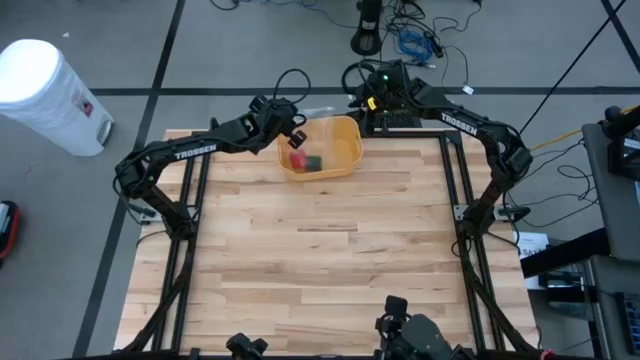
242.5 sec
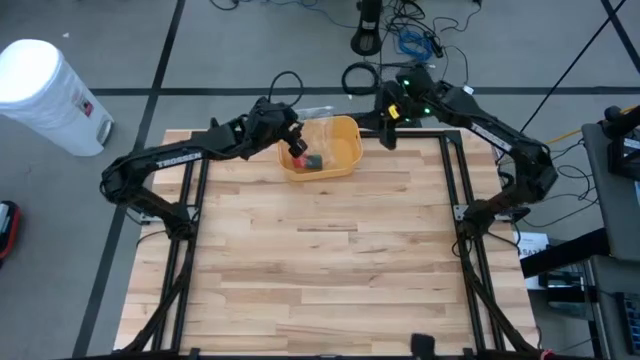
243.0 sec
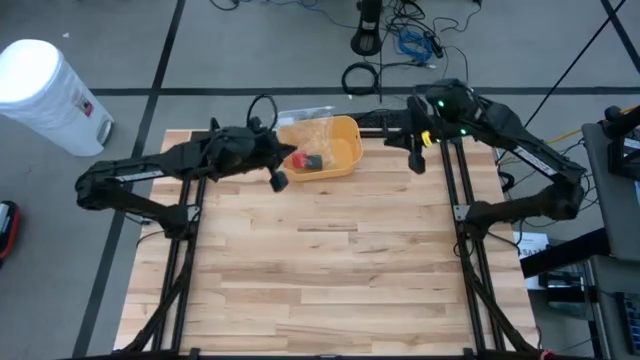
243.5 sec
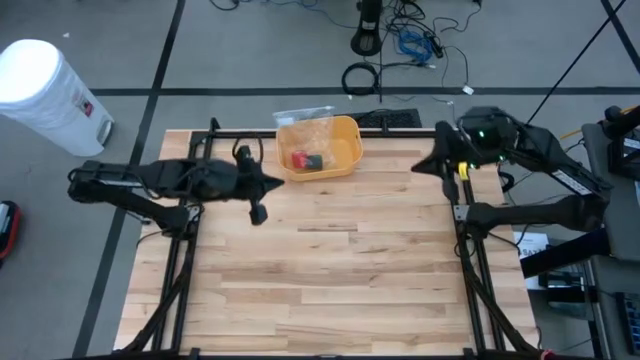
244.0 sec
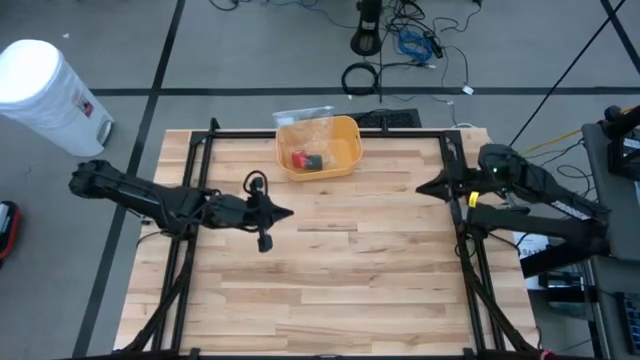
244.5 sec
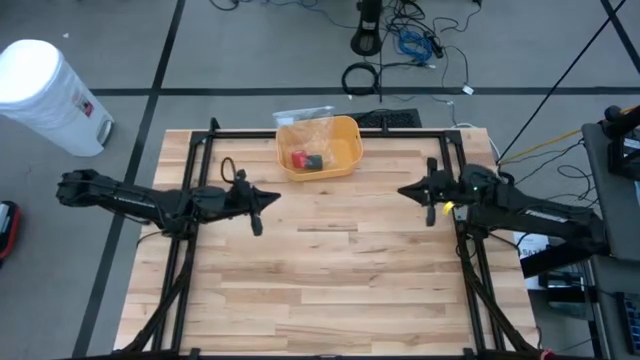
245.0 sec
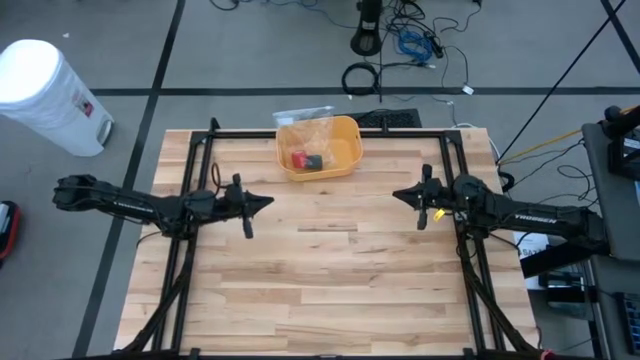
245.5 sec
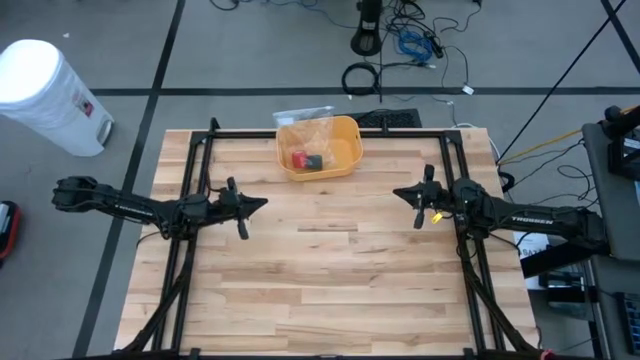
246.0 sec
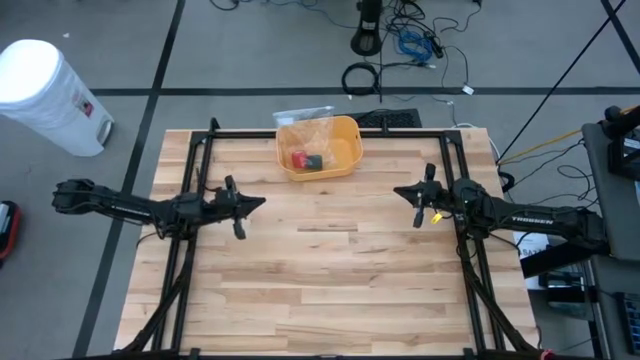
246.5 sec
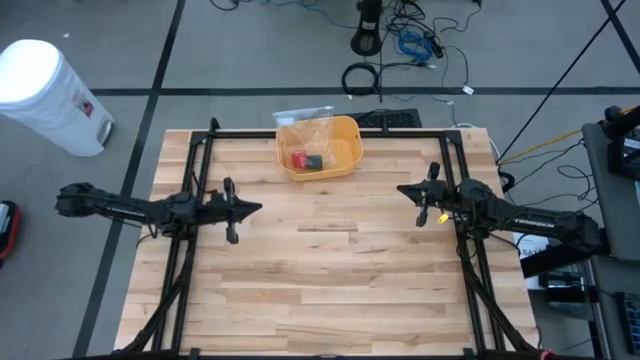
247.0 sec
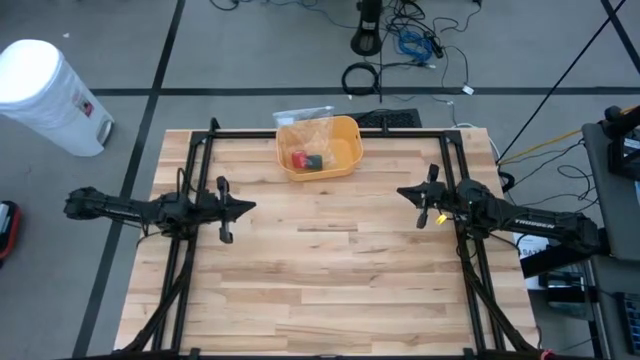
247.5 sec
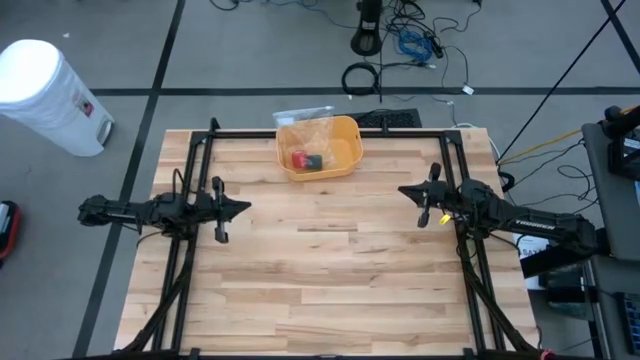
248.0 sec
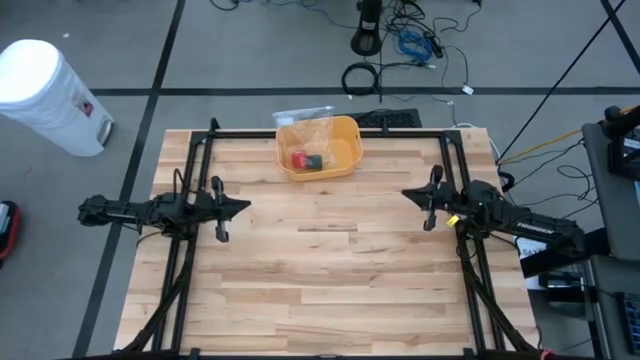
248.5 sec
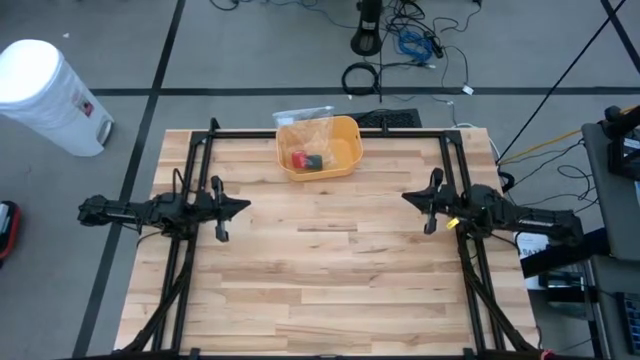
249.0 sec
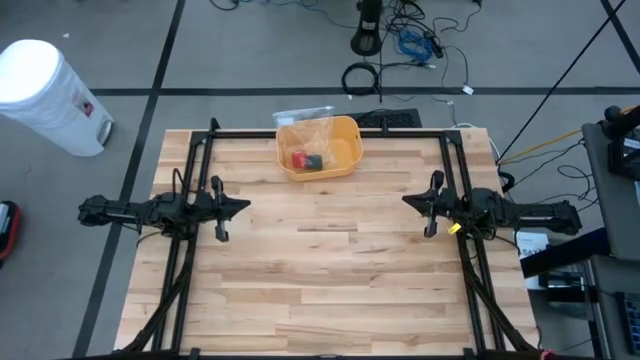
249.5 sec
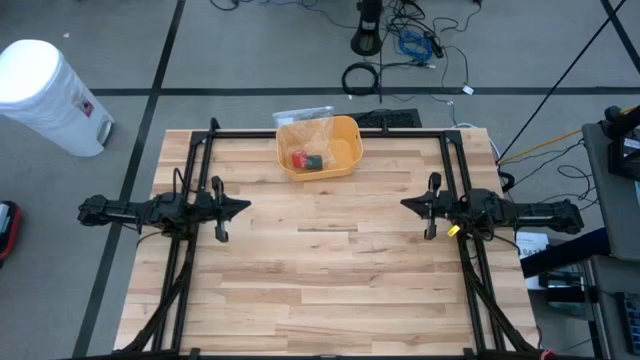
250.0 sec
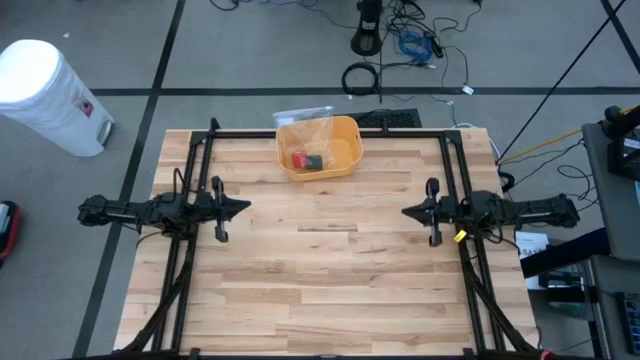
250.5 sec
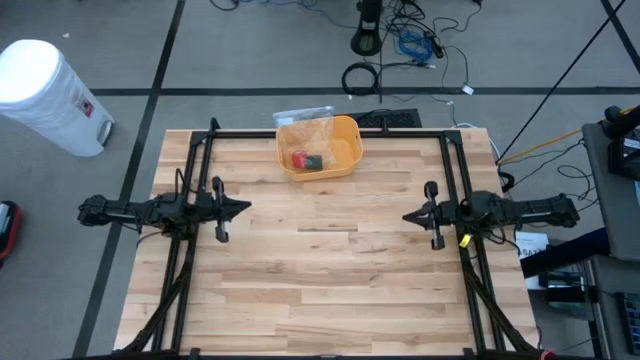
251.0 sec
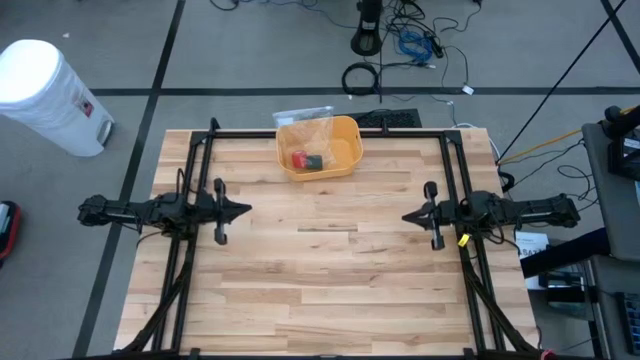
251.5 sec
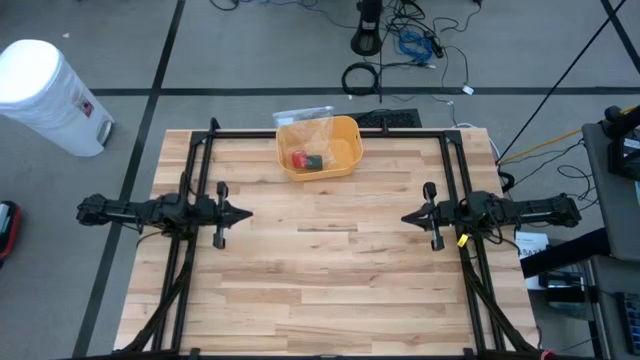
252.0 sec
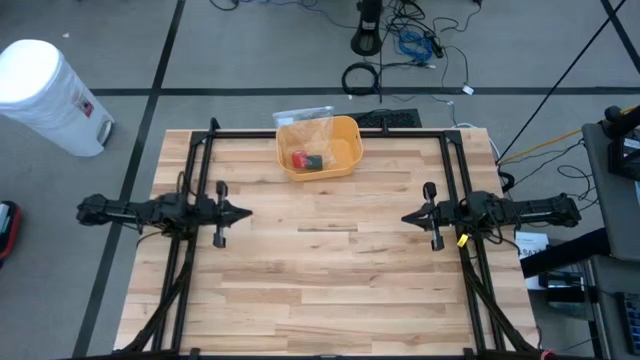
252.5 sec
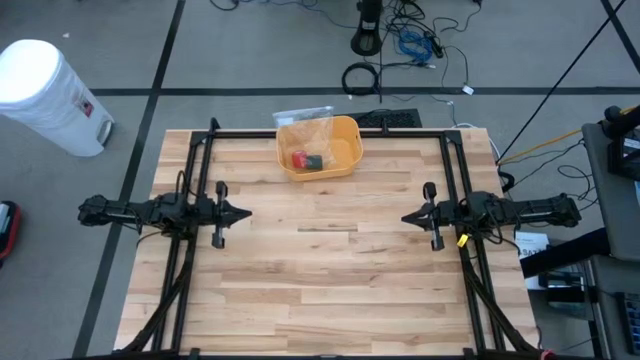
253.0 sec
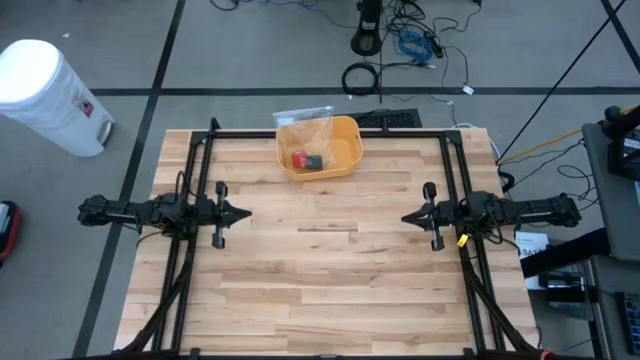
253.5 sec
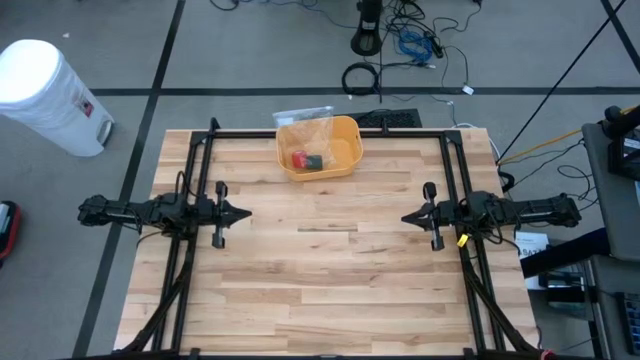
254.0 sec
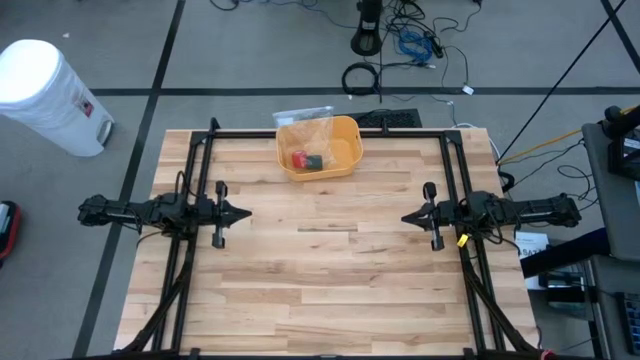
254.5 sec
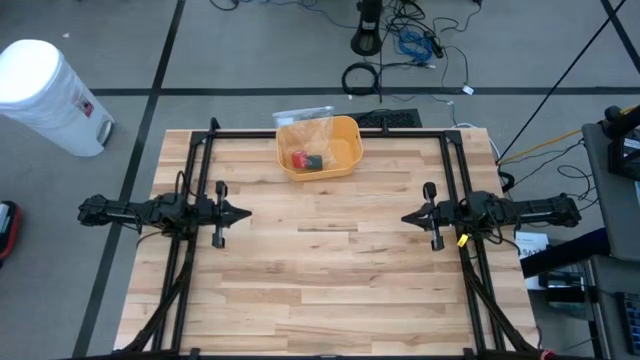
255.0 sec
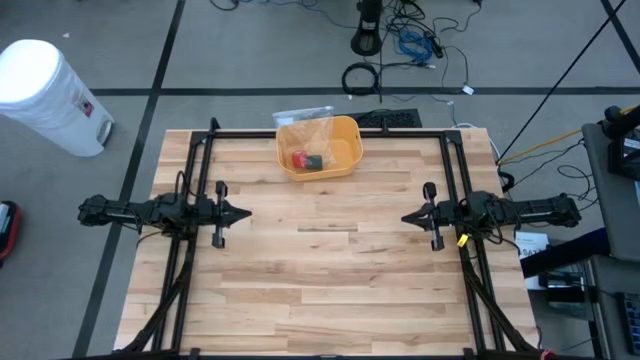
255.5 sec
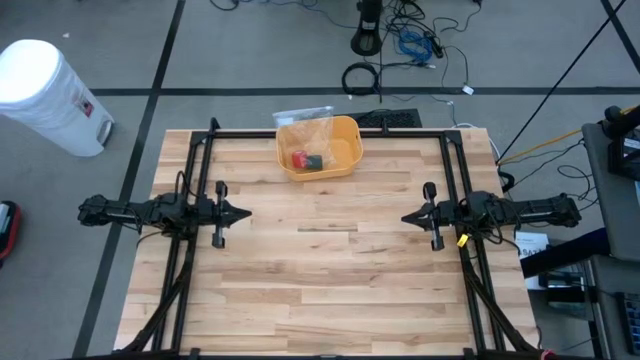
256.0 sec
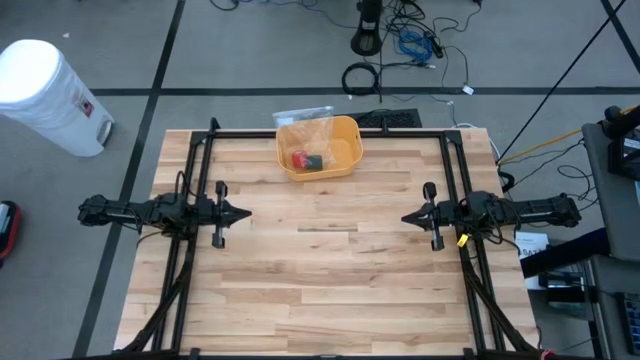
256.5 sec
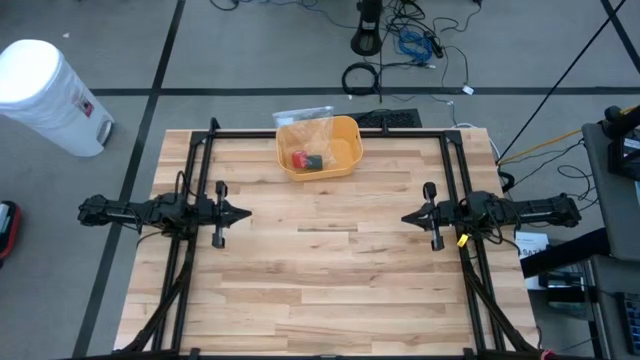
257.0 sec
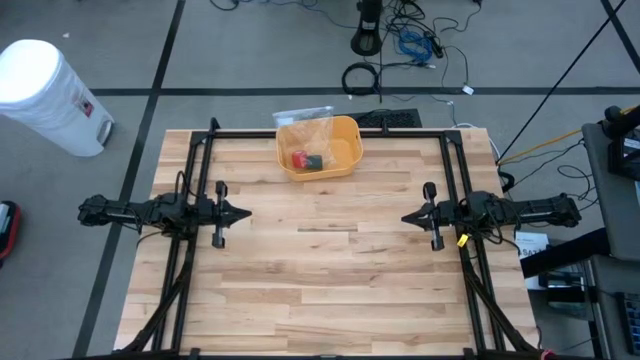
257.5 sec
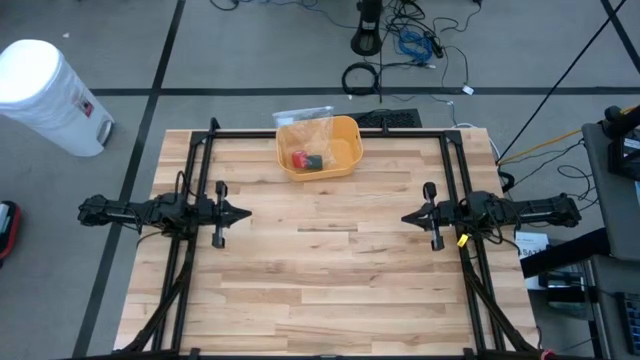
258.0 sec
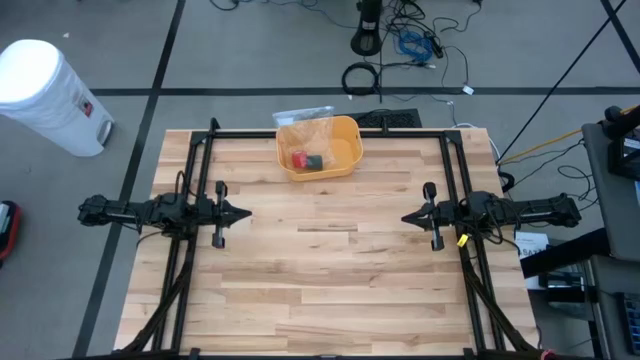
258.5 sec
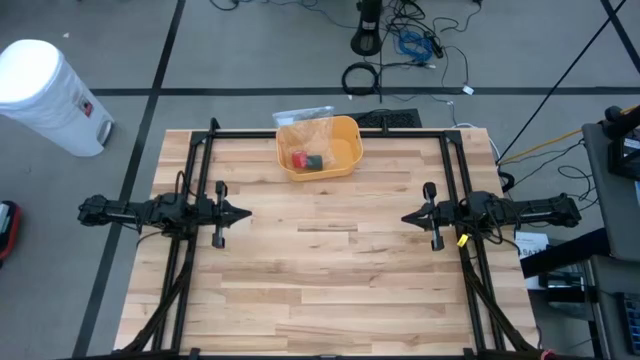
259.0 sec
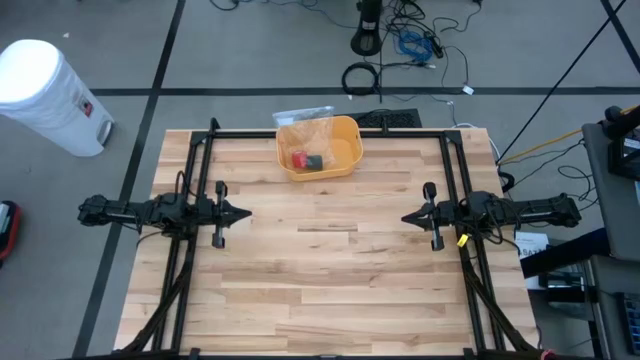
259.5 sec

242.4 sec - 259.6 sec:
Task: Roll bandage
Return to Home Position

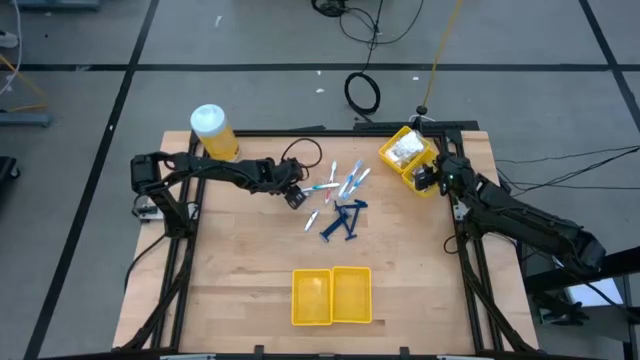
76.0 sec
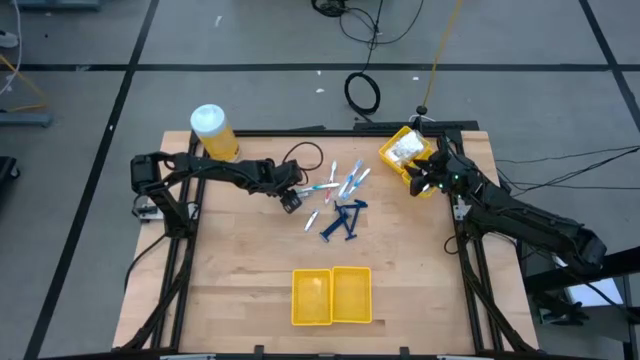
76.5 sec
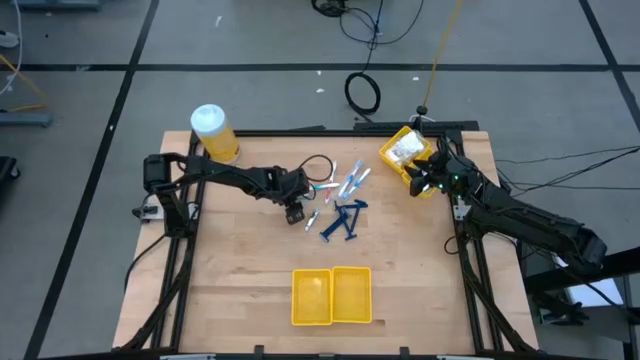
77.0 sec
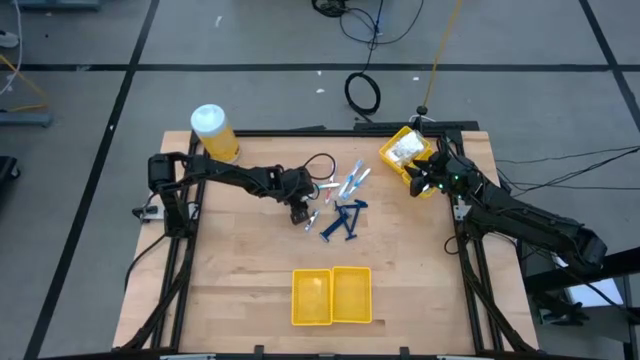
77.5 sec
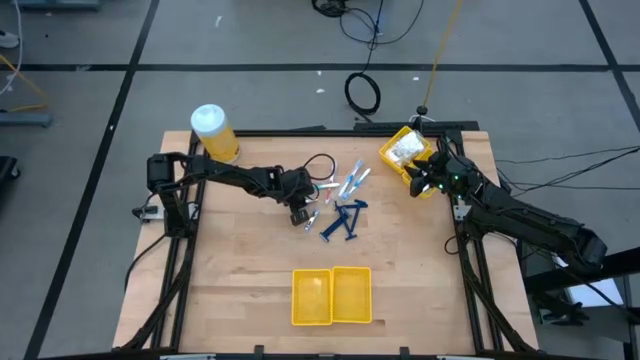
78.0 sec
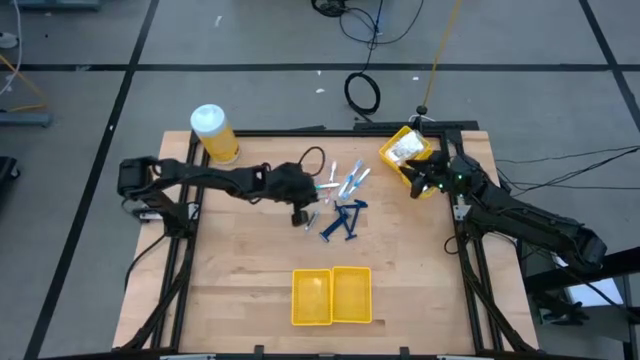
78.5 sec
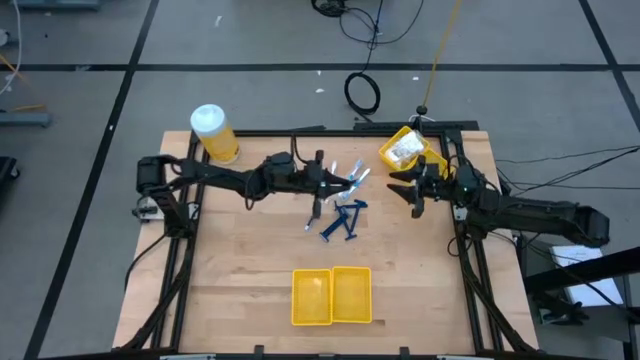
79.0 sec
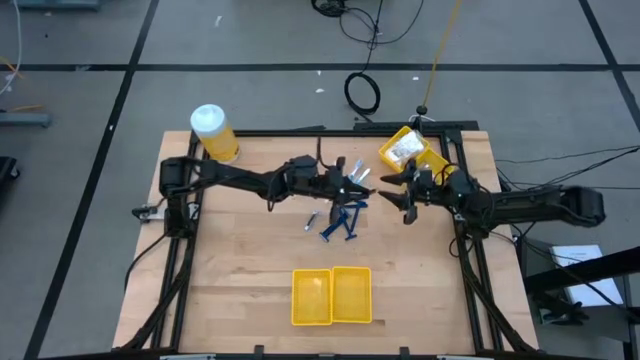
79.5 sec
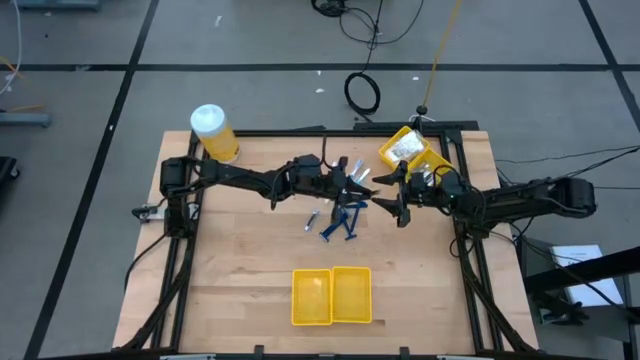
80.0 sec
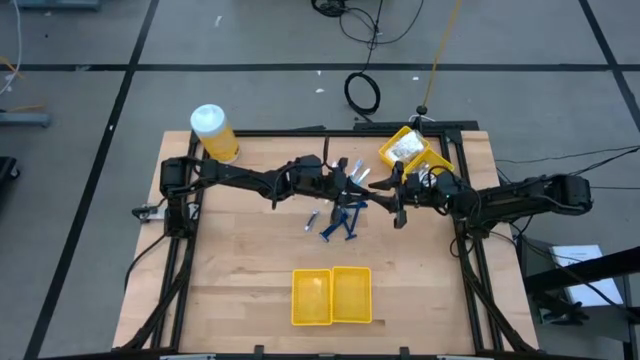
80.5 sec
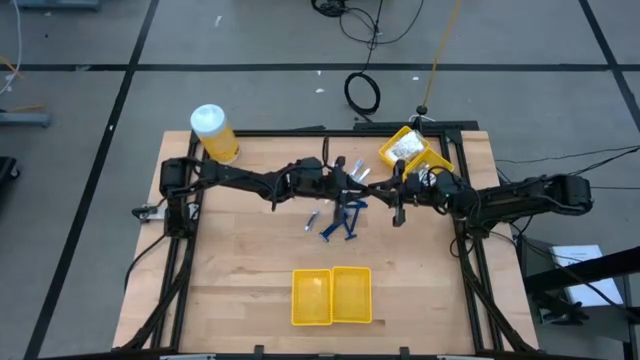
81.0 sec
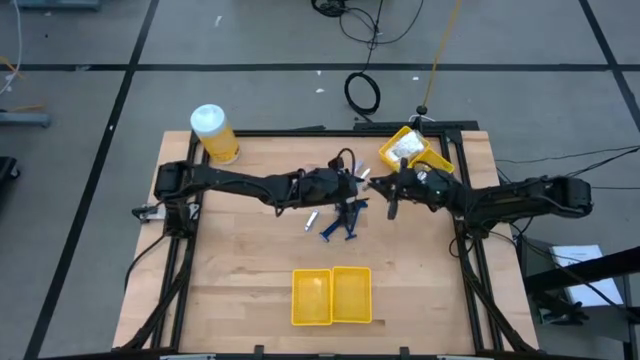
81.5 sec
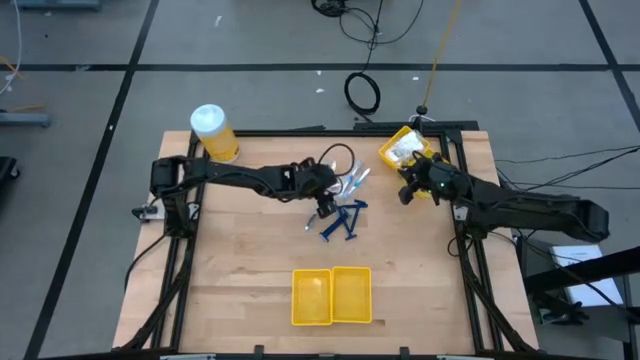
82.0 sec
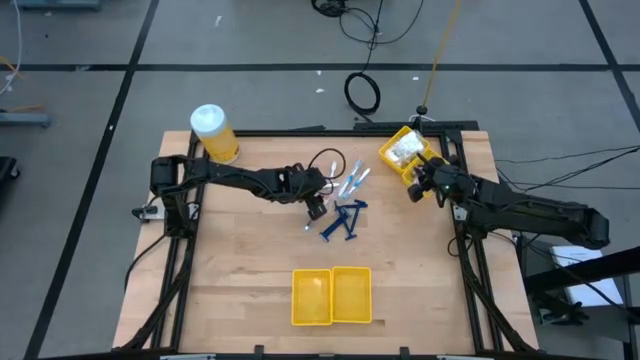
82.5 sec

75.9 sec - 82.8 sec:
Task: Pick & Place Travel size toiletries
Put the silver nail cutter into the top right yellow bin
